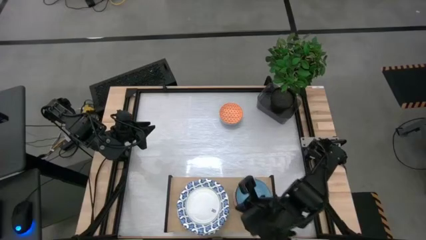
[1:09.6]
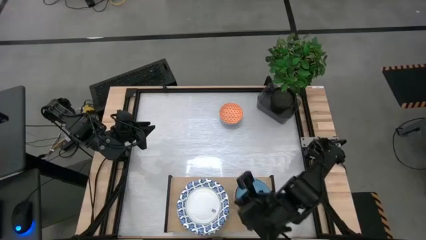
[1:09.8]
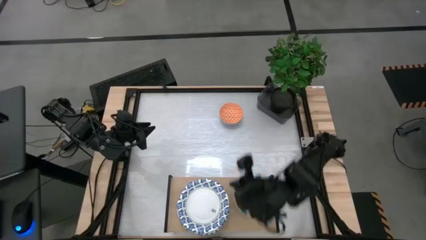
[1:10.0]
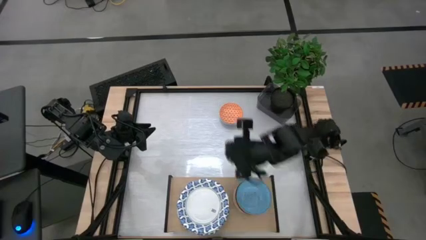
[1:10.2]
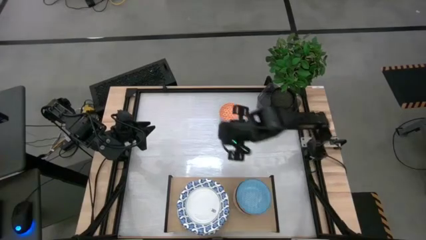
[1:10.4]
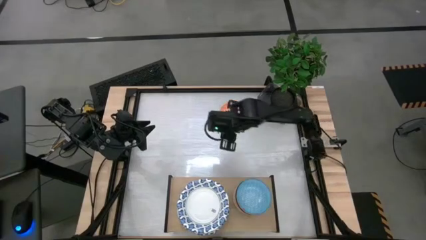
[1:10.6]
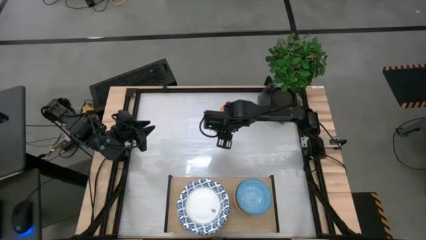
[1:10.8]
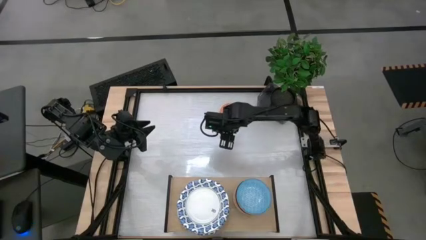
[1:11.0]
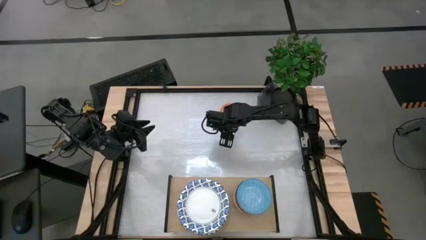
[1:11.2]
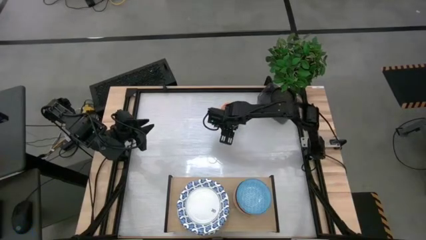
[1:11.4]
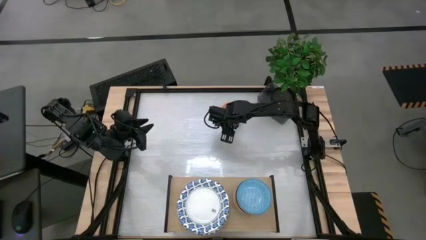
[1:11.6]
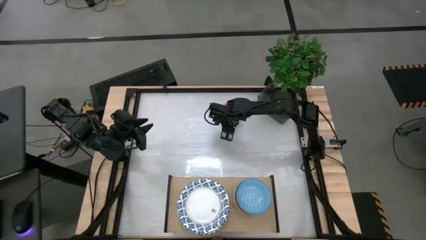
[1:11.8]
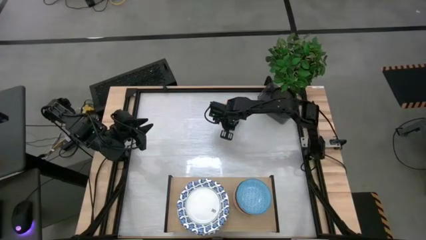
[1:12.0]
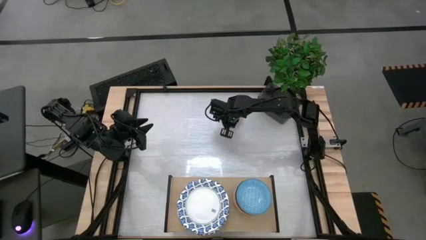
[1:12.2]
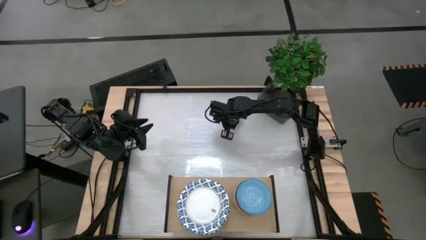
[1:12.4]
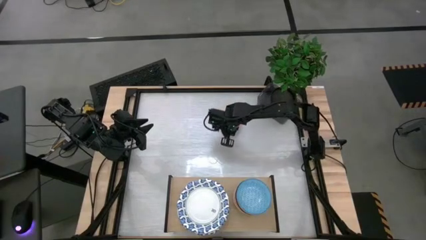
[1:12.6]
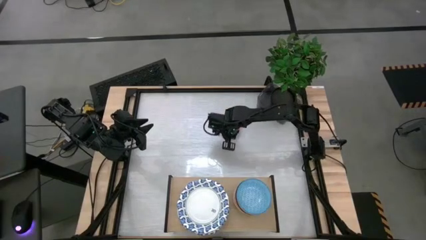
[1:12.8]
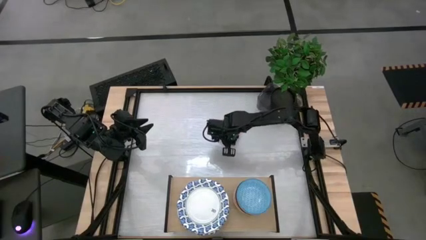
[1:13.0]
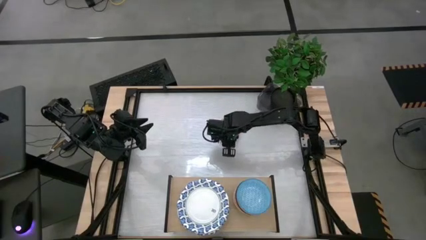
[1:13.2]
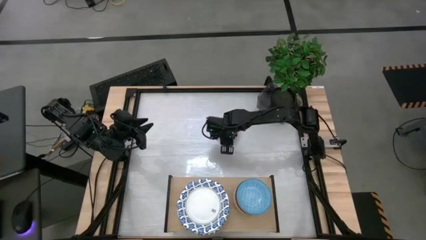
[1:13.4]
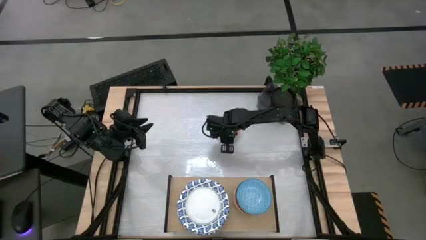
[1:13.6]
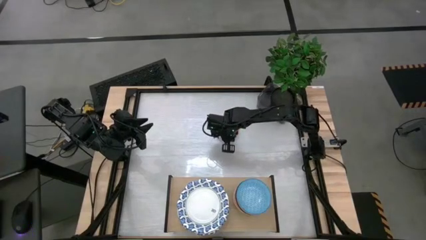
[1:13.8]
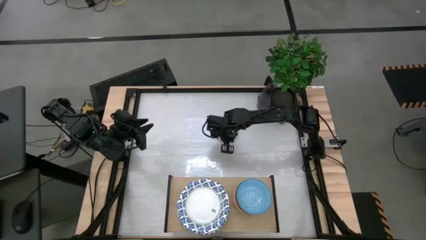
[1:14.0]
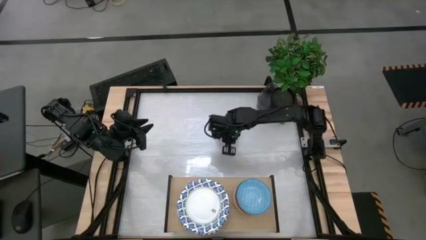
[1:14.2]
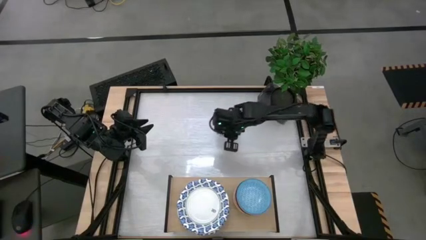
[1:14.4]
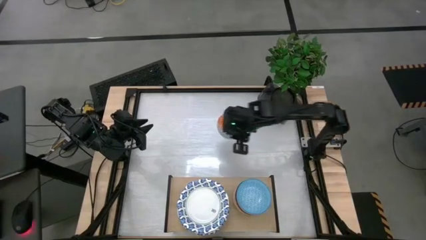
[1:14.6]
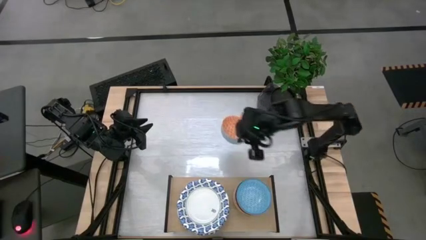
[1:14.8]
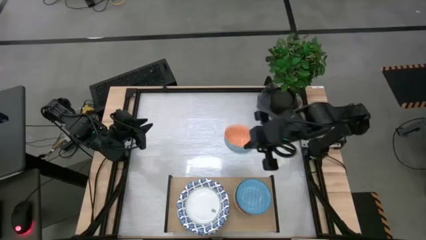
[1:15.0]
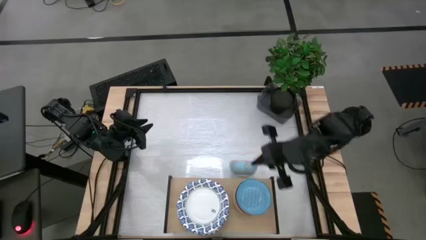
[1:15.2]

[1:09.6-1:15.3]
Task: Place and stack plates onto a shelf
Stack the orange bowl on top of the light blue bowl on the shelf

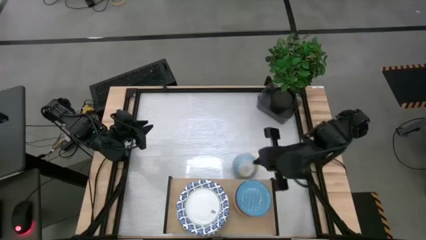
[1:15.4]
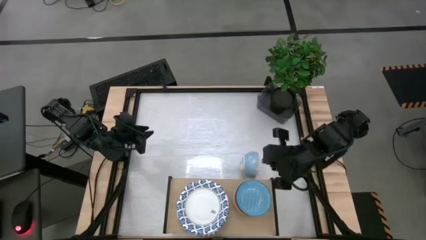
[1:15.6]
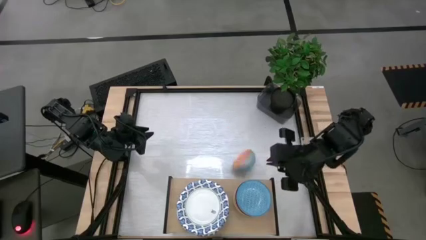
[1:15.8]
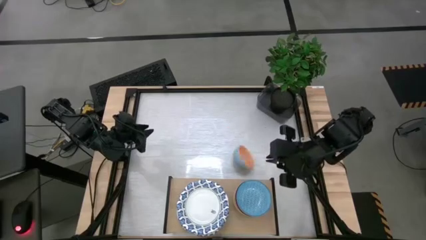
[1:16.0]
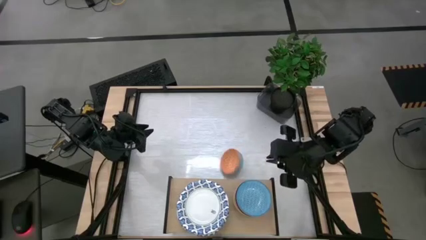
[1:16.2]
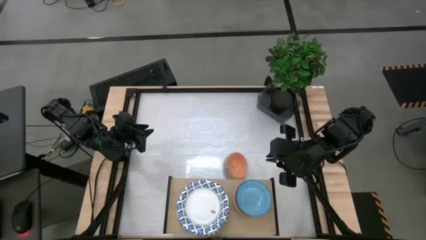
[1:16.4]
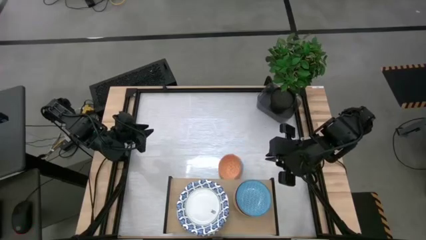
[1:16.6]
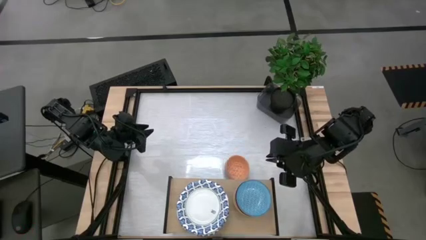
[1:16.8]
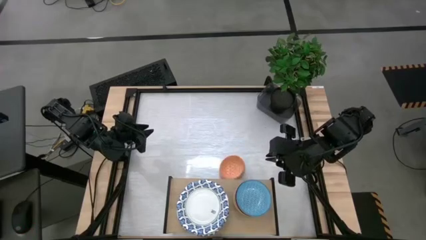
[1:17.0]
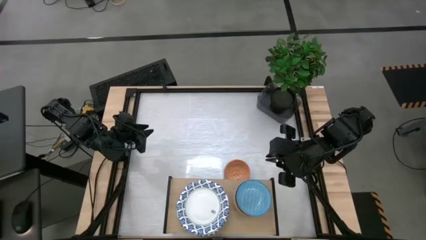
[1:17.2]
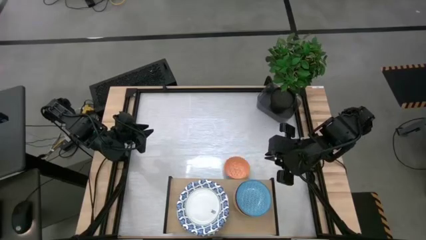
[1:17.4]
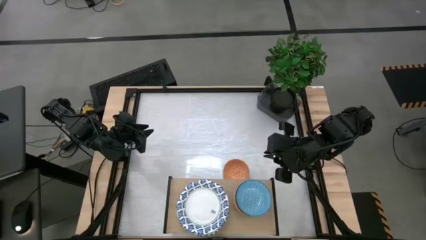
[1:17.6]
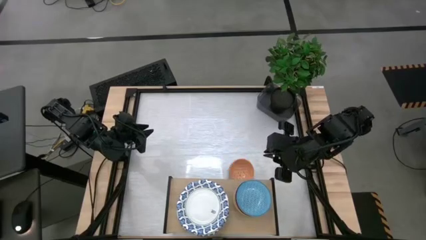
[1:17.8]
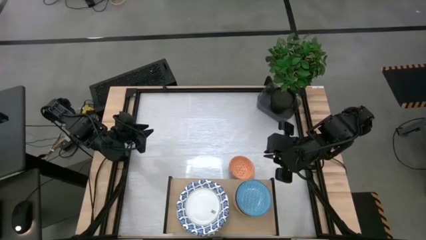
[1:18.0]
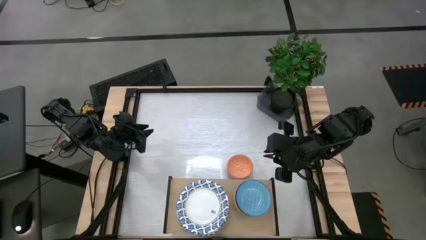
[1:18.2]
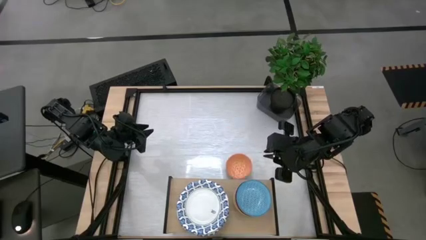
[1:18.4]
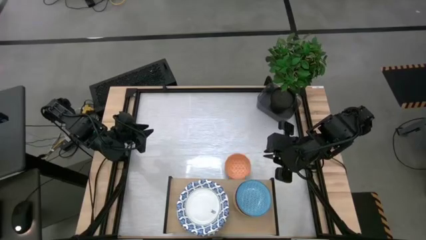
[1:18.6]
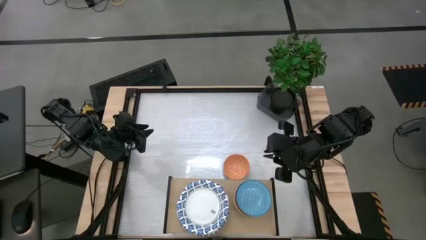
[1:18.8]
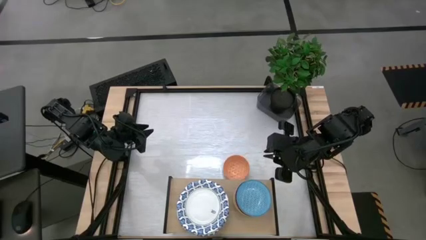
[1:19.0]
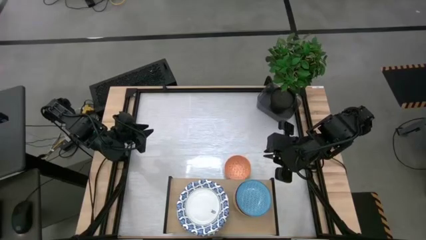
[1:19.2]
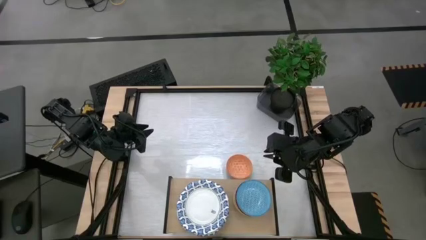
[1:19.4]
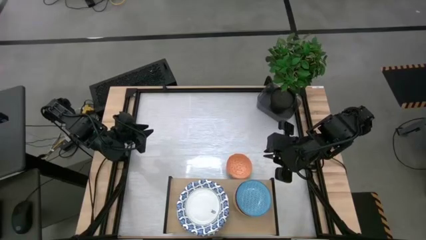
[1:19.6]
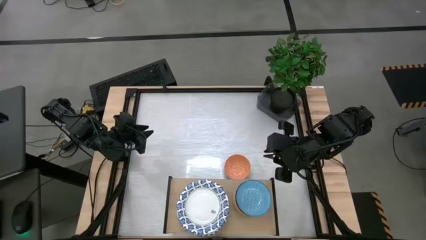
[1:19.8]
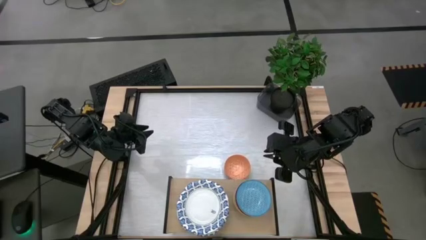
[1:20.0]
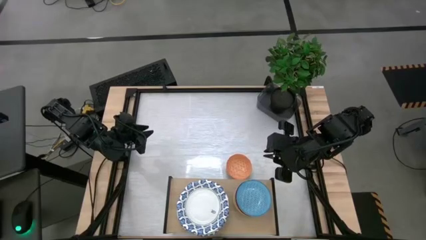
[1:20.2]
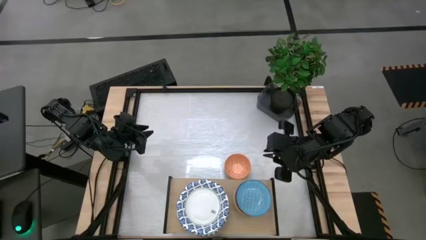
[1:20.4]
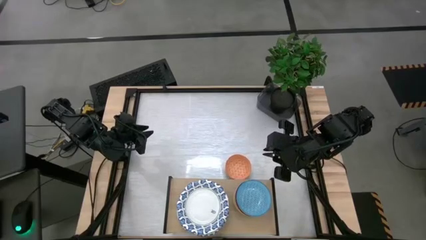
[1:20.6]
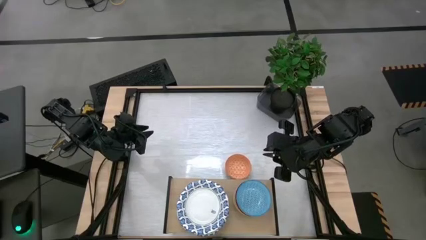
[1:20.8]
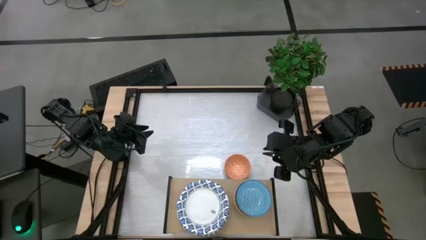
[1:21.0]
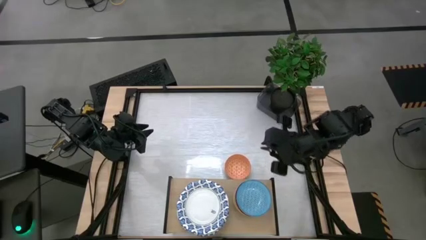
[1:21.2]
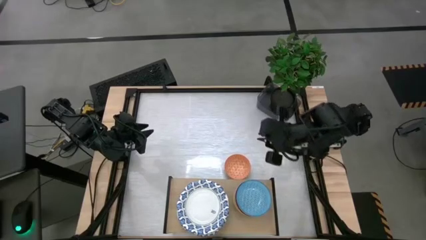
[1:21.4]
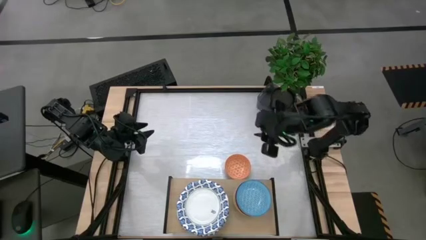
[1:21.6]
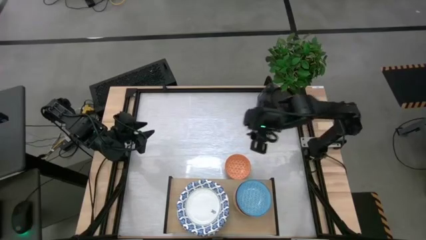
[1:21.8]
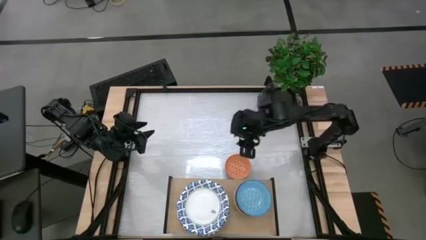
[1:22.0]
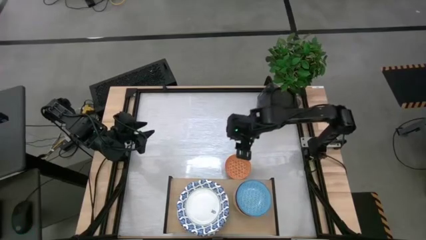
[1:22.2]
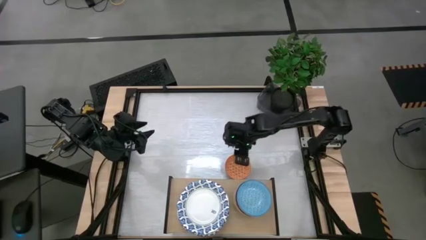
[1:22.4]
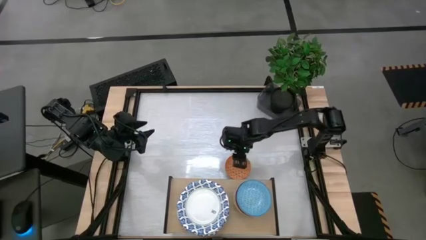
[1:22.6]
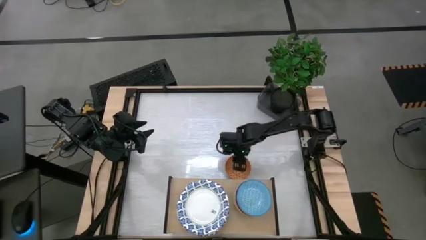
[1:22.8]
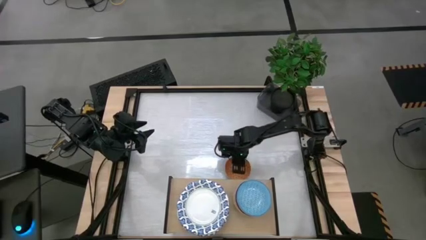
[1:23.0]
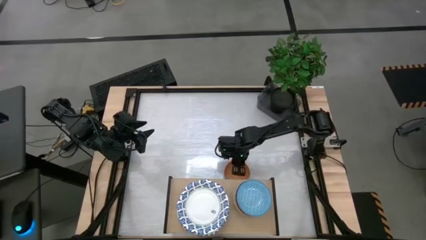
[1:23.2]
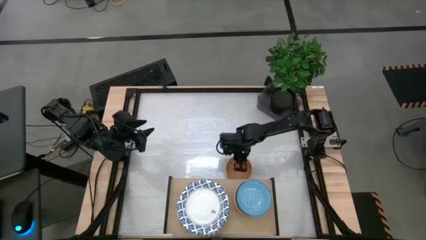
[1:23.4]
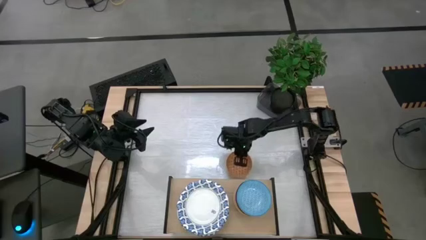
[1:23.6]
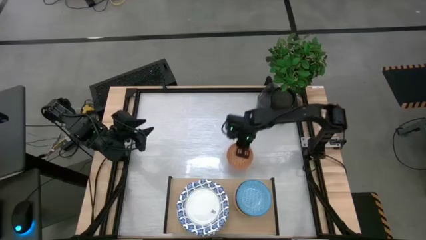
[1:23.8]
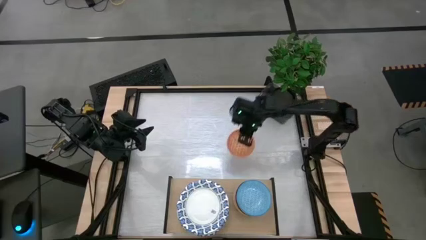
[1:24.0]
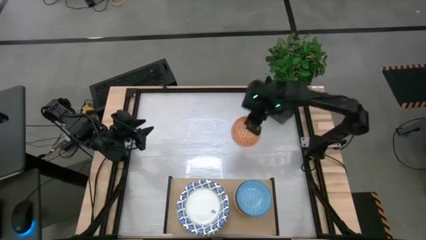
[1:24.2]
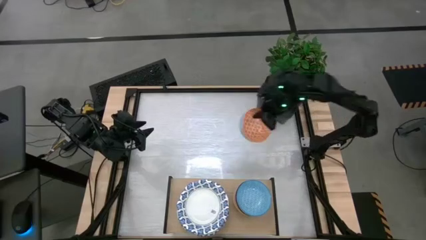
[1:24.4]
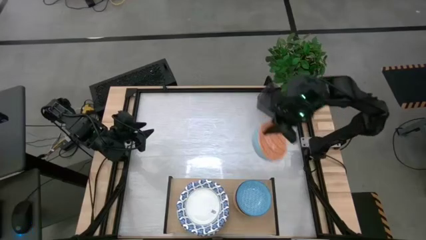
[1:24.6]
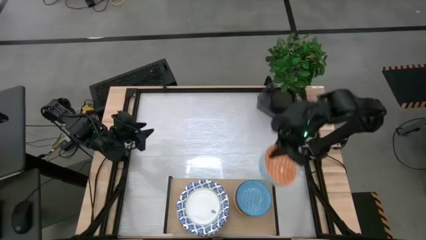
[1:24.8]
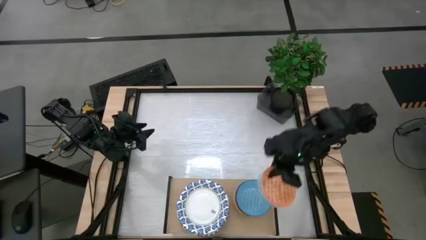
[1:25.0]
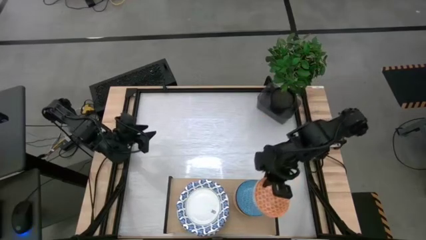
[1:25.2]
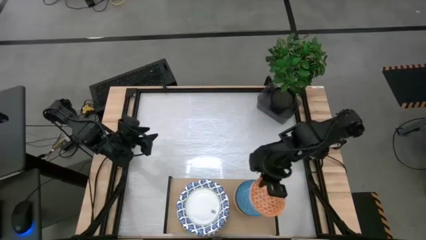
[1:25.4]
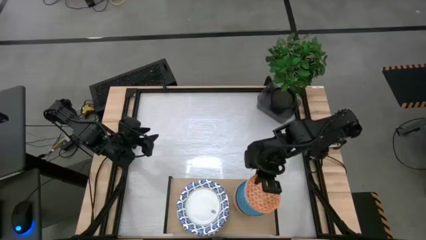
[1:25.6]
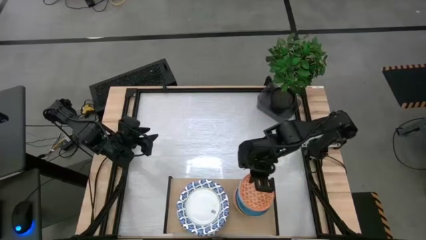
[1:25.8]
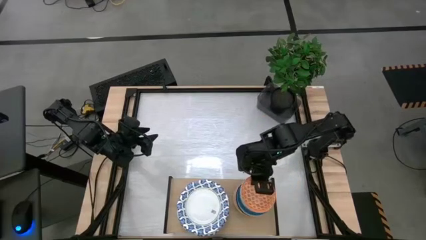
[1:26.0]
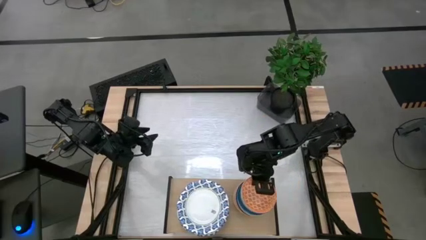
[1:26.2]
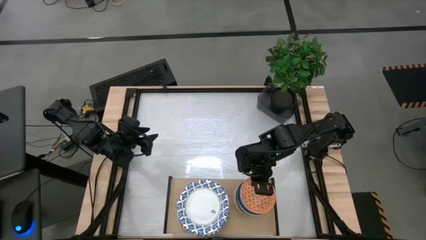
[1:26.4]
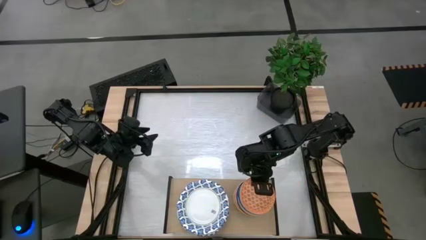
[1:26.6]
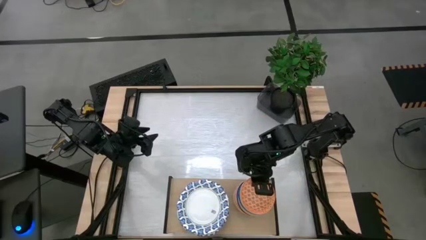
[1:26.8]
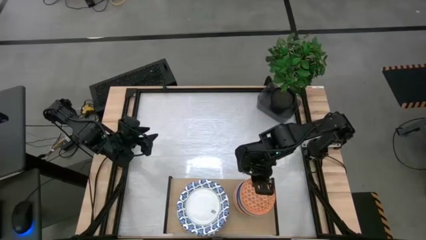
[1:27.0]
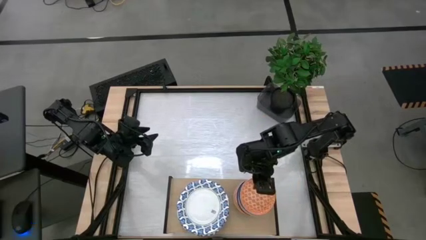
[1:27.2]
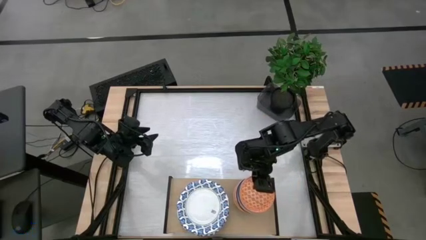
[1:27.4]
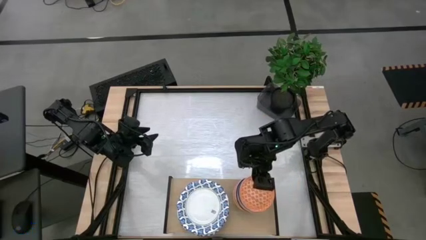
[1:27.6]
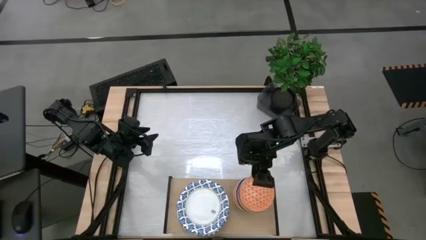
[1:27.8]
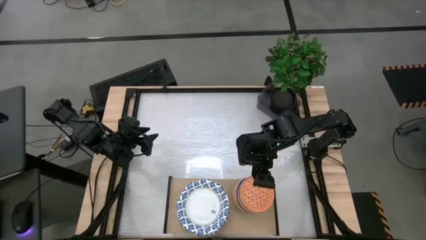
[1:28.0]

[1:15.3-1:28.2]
Stack the orange bowl on top of the light blue bowl on the shelf
